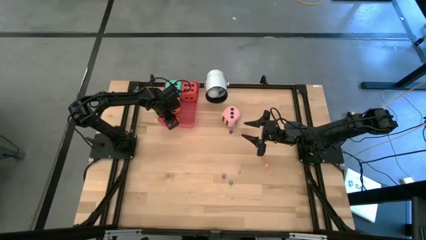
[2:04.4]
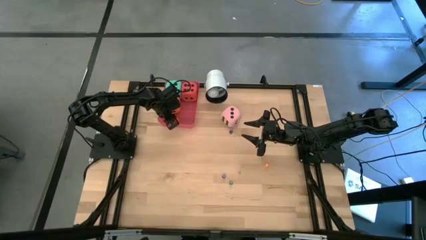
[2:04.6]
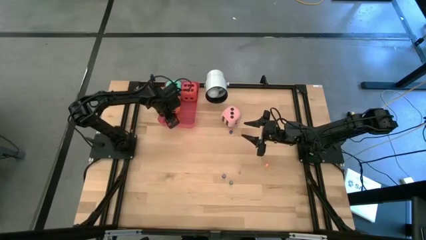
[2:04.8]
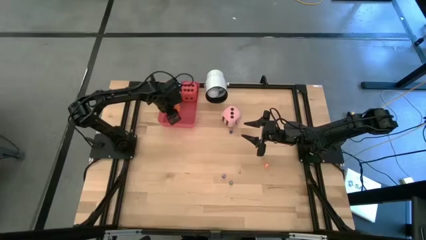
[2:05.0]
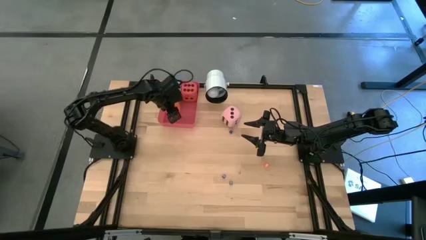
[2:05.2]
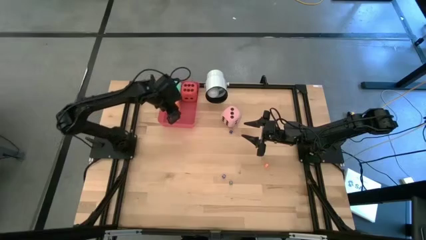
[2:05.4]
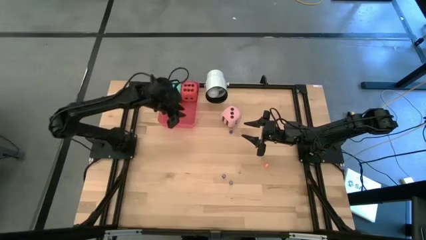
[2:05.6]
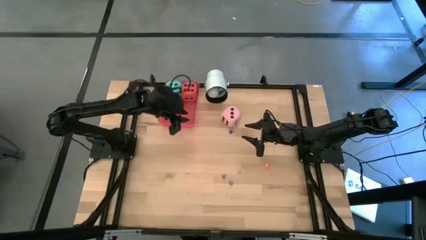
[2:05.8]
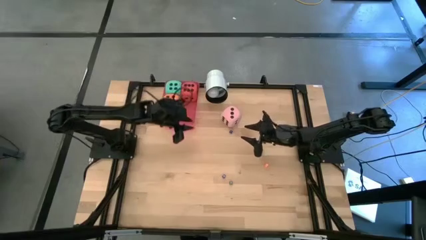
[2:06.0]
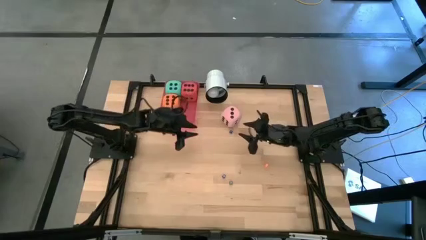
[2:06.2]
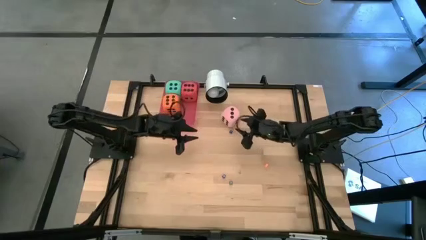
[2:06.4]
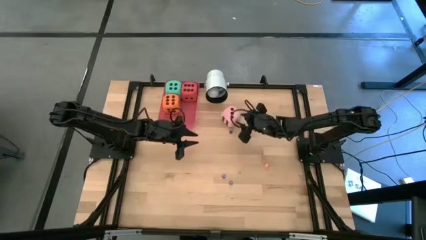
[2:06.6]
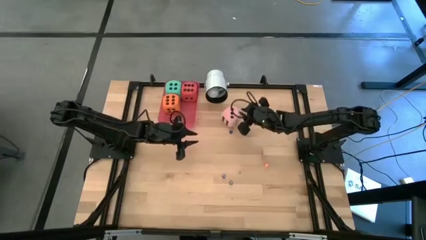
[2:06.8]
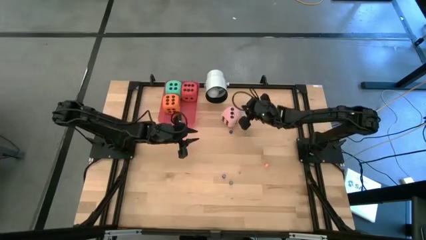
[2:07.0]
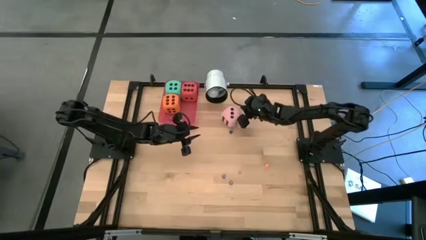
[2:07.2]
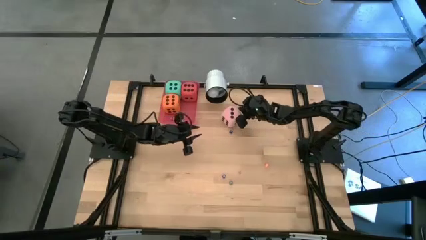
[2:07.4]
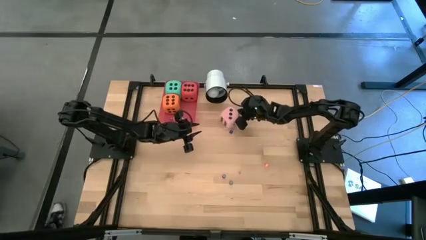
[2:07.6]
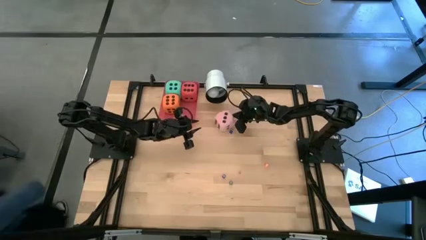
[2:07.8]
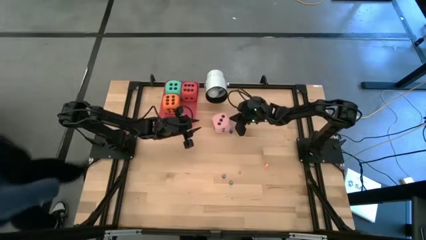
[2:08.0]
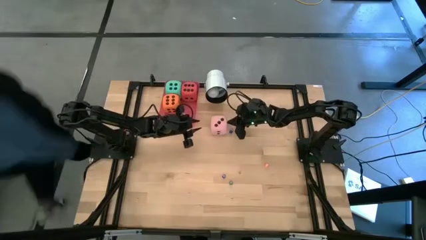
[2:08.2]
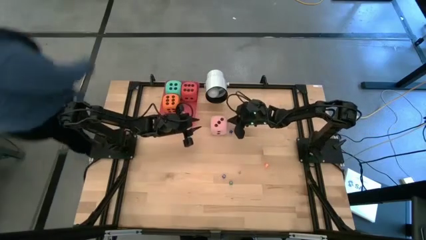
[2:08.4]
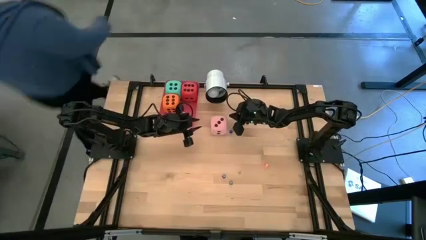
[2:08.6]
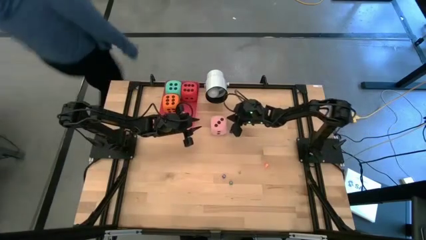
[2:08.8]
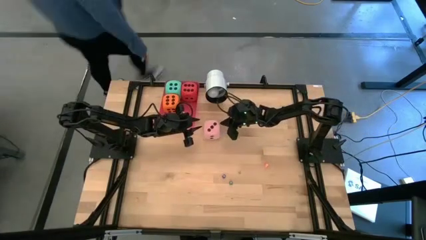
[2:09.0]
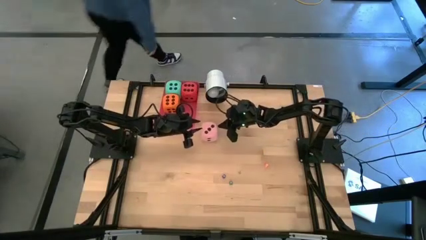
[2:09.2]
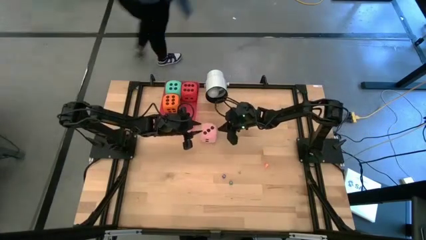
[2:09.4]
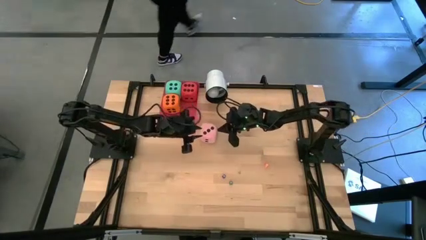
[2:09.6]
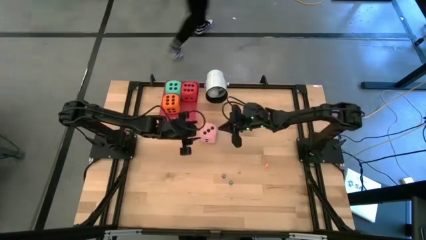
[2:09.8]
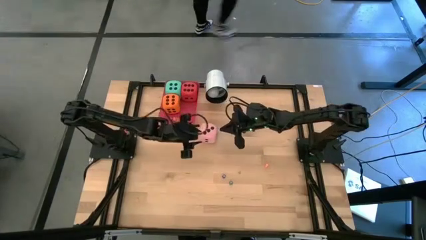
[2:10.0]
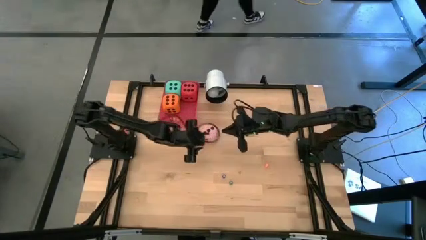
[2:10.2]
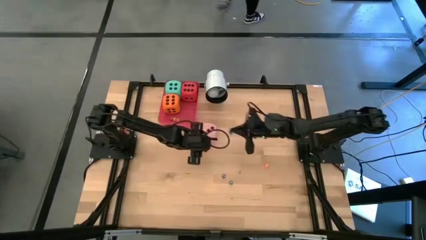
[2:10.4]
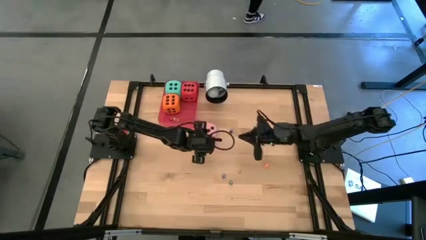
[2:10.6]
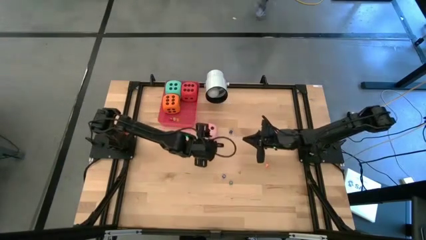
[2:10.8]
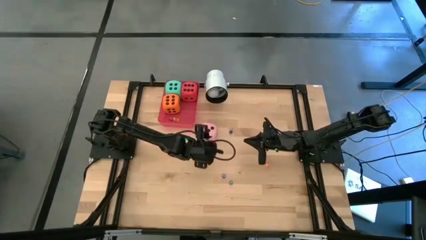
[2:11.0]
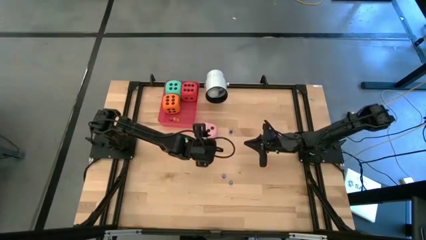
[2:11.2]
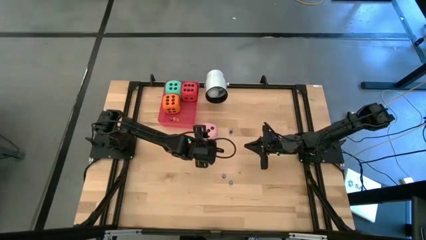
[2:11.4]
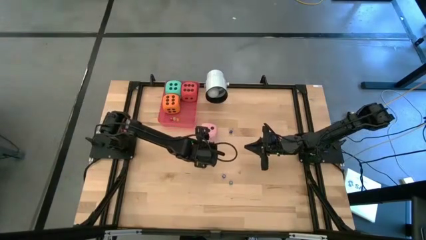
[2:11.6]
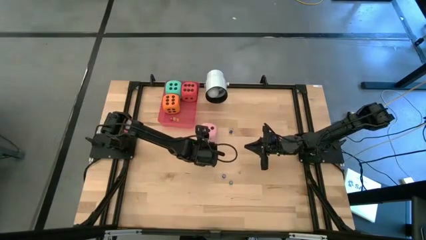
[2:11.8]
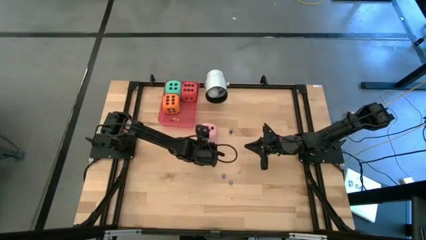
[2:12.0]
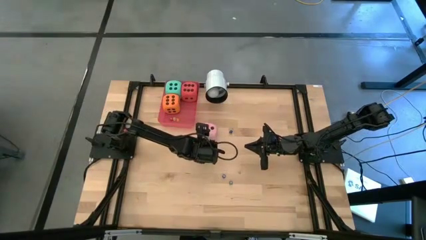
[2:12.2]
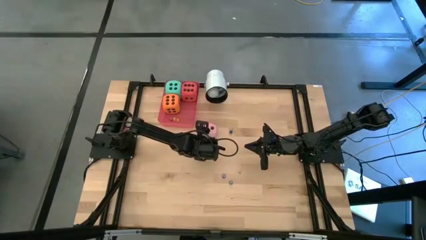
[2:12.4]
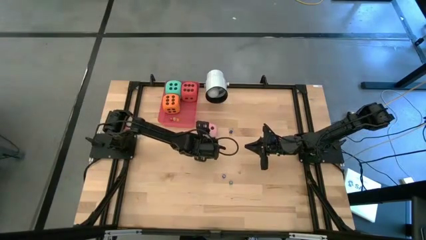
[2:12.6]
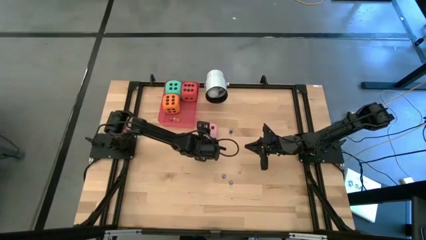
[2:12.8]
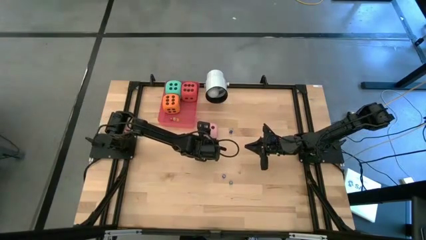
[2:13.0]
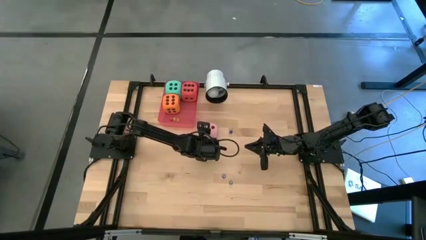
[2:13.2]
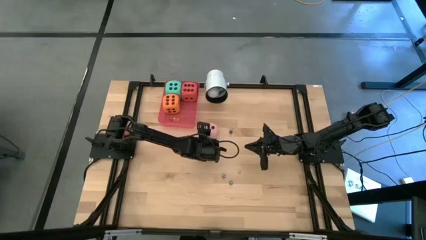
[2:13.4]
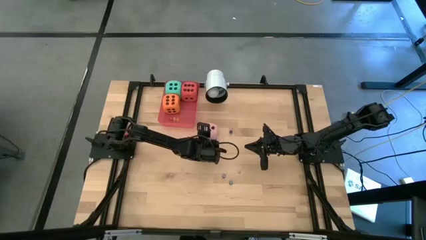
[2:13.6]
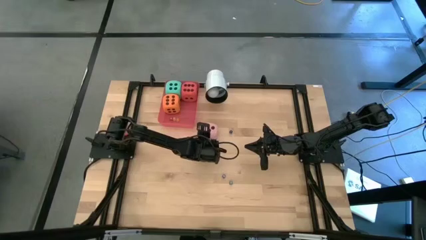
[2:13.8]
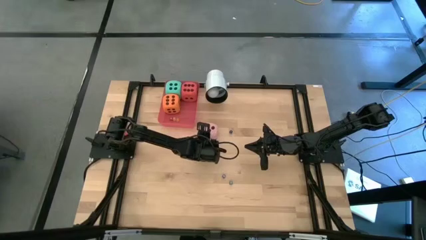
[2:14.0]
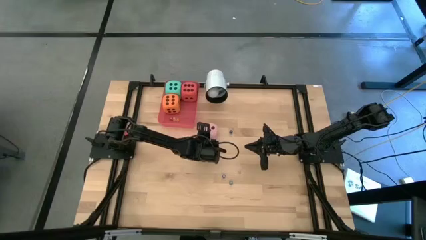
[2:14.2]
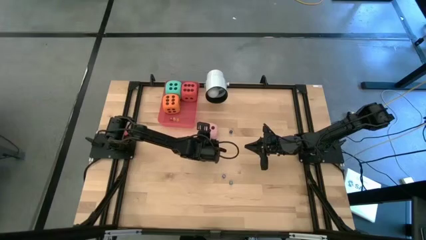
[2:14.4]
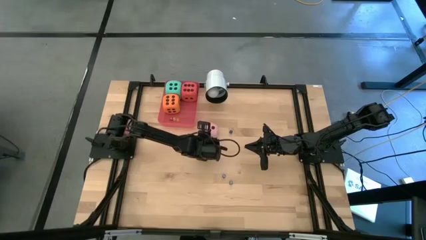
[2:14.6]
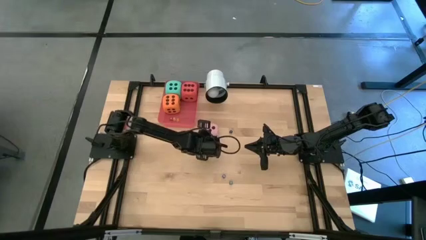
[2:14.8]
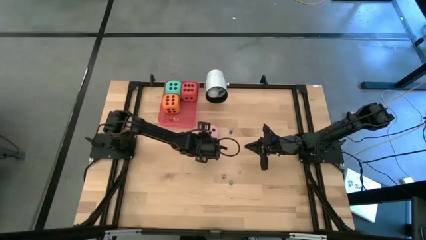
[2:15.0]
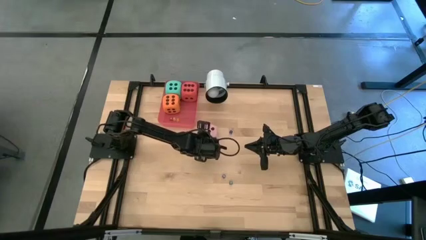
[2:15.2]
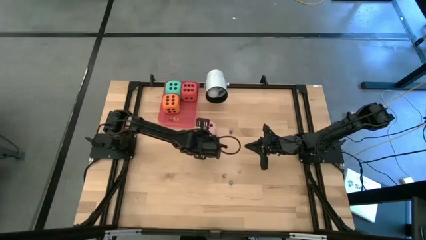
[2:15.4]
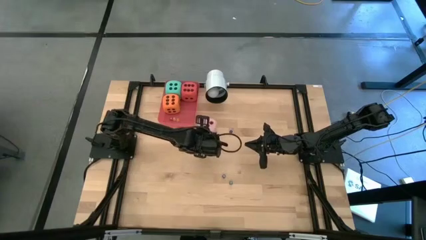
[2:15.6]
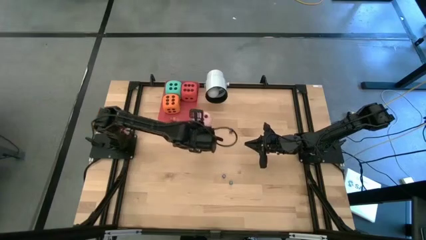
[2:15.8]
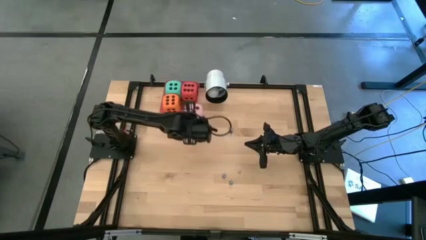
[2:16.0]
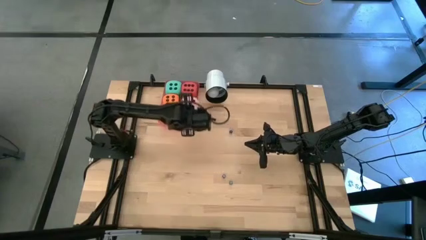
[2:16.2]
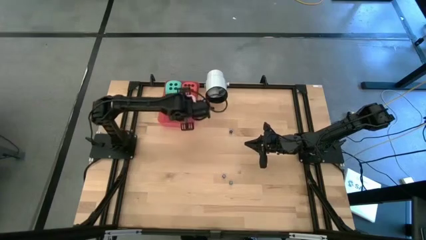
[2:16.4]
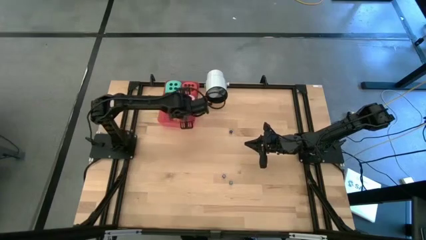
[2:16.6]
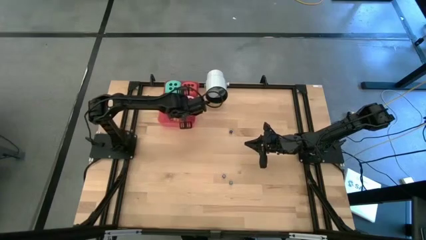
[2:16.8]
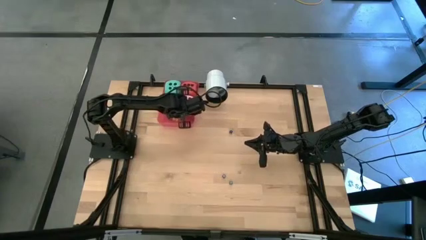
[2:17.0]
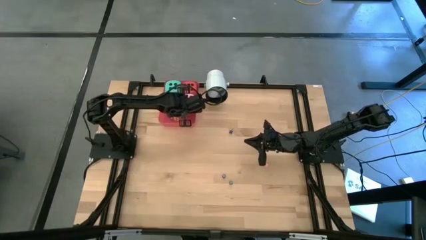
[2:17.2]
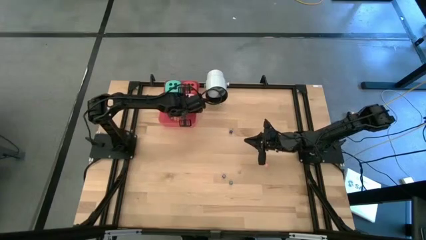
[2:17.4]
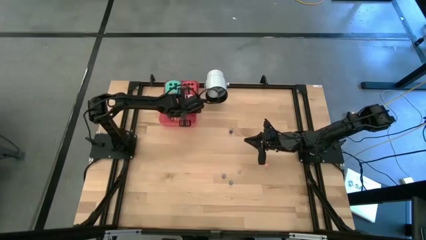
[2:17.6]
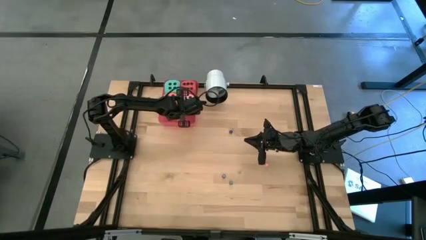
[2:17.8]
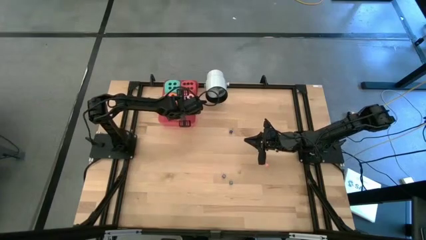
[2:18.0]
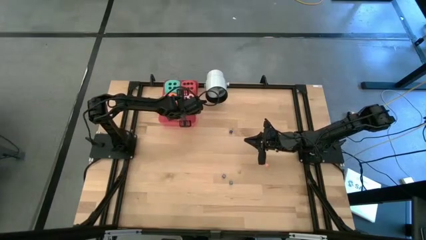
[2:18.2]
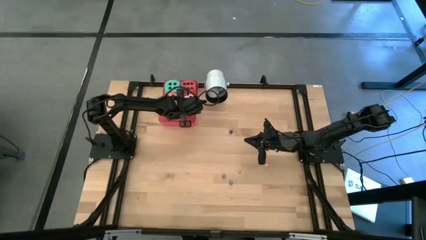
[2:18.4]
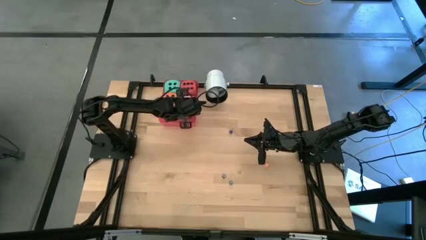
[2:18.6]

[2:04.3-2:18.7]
Task: Pick & Place Dice
Put the big pink dice into the red bin

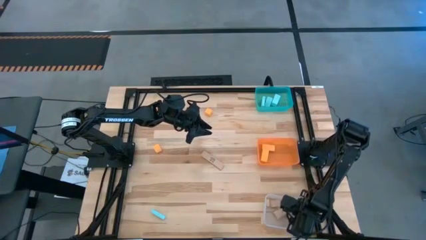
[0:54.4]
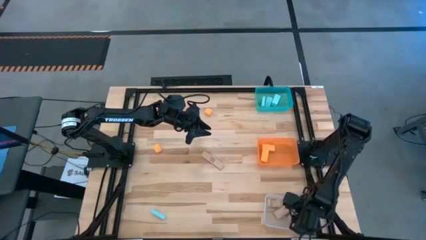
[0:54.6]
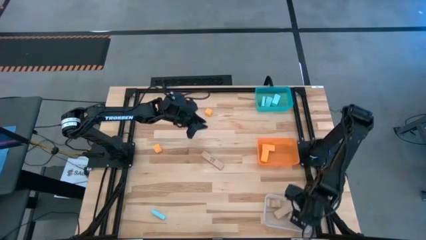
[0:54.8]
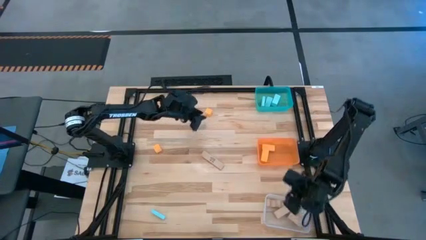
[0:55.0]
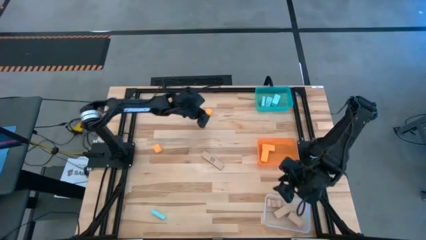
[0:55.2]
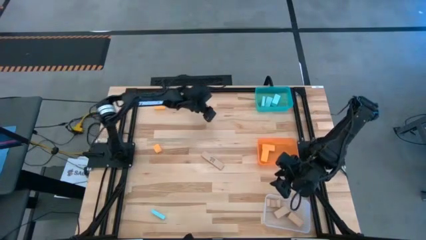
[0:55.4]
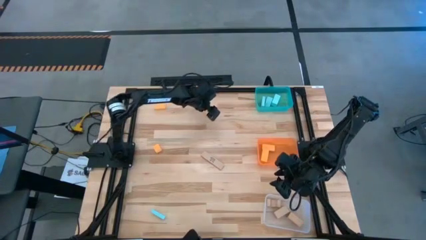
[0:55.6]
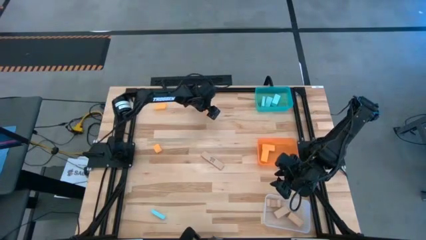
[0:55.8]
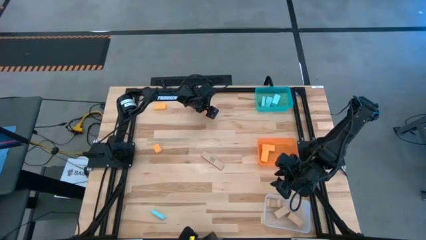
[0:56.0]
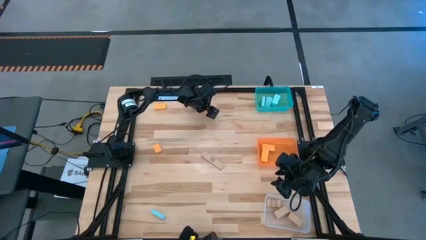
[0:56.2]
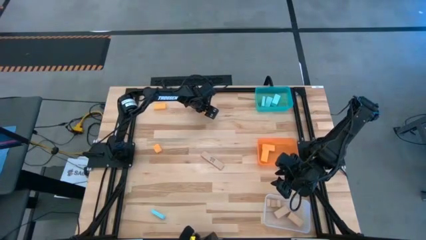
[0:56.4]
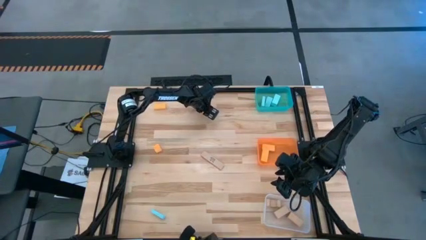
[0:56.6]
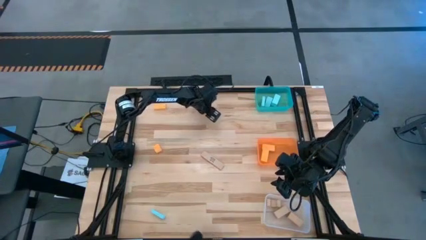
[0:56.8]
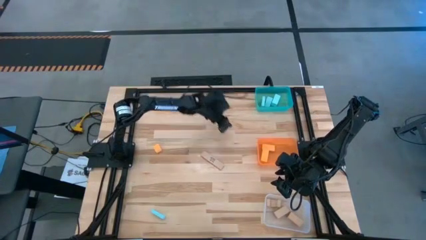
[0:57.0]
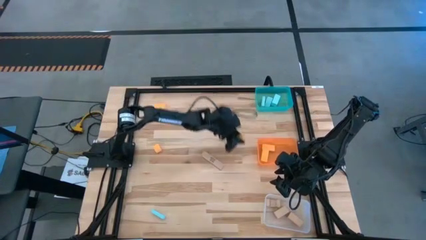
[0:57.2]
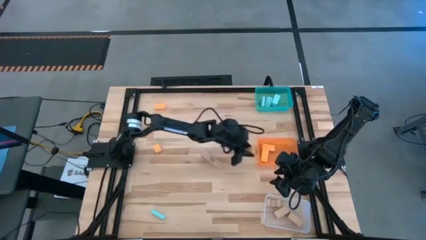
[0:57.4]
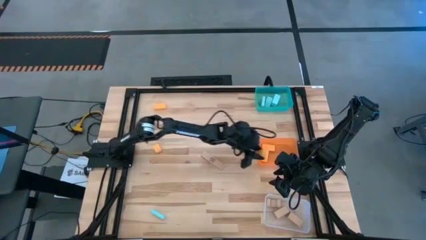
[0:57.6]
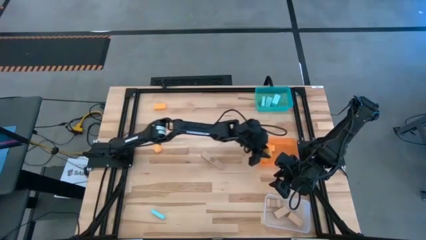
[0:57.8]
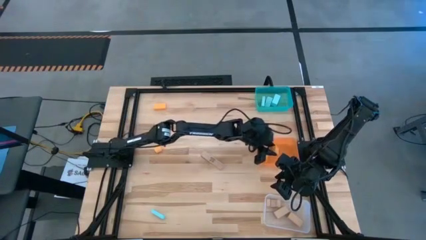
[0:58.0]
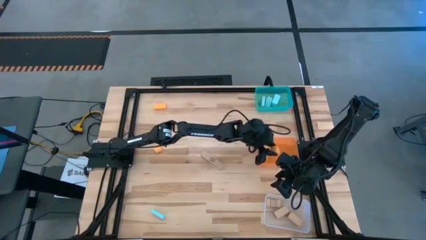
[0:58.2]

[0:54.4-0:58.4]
Task: Sort & place blocks by color
Put the orange block into the orange bin
